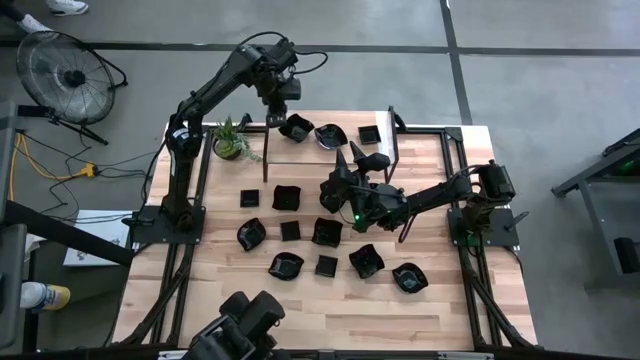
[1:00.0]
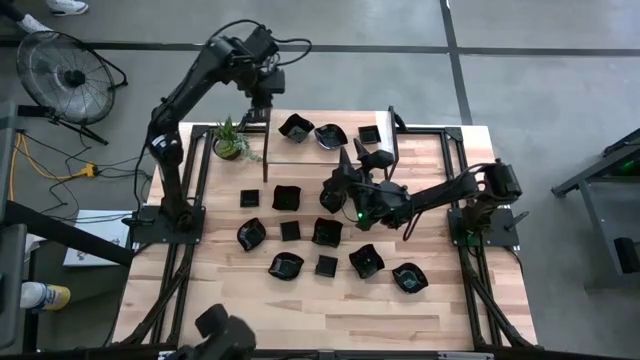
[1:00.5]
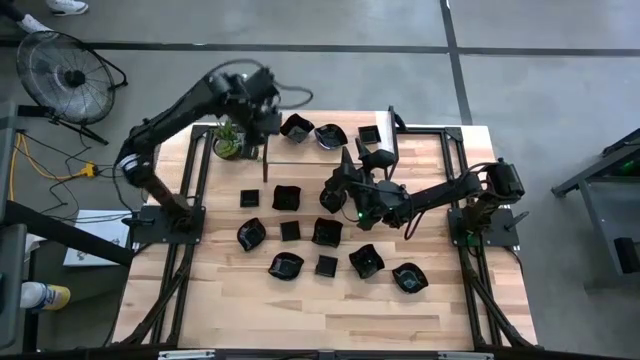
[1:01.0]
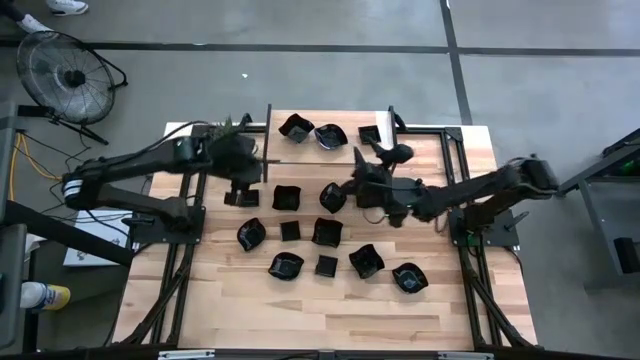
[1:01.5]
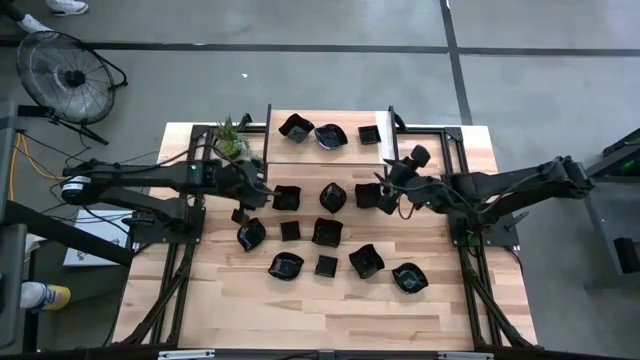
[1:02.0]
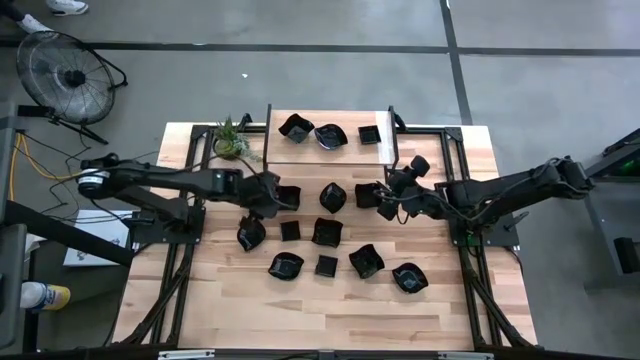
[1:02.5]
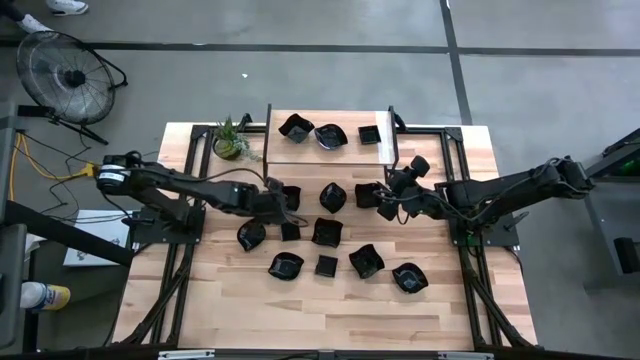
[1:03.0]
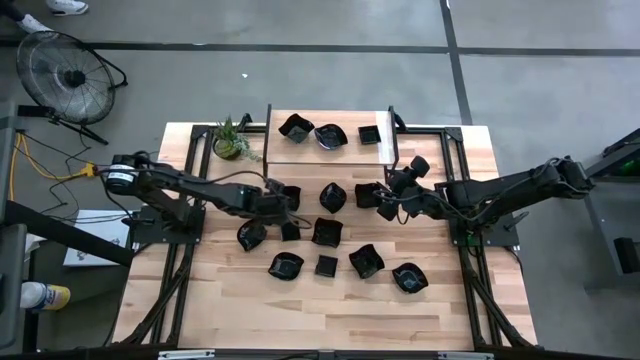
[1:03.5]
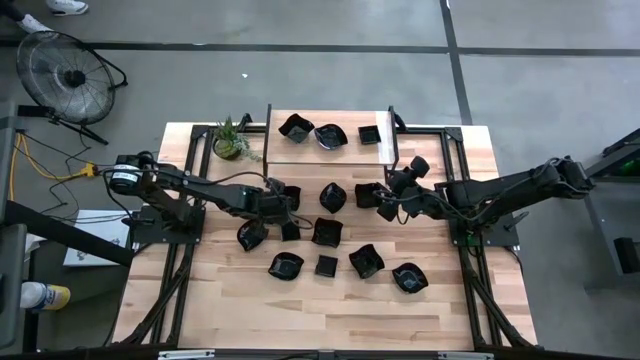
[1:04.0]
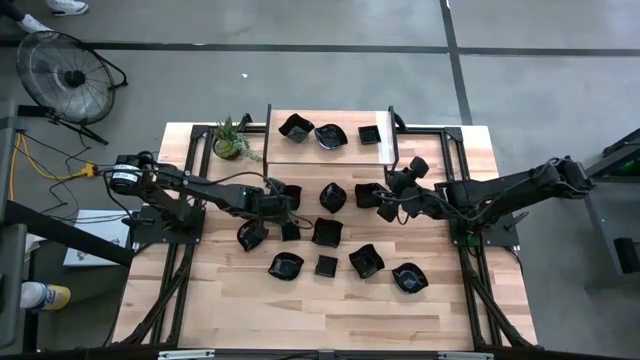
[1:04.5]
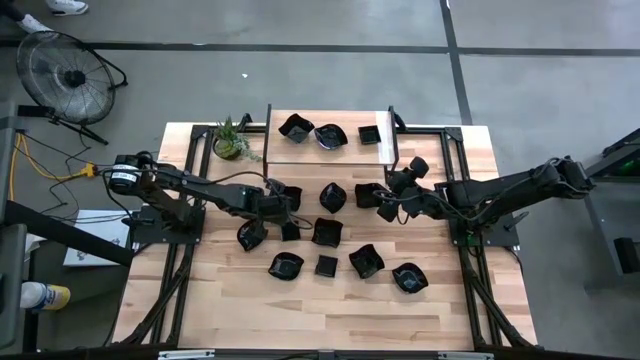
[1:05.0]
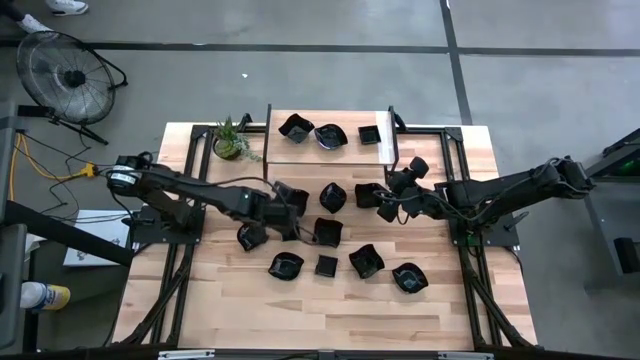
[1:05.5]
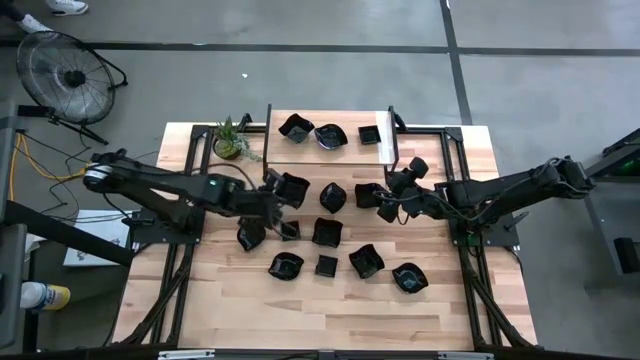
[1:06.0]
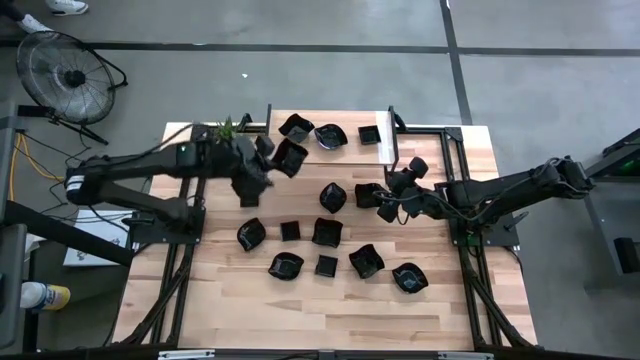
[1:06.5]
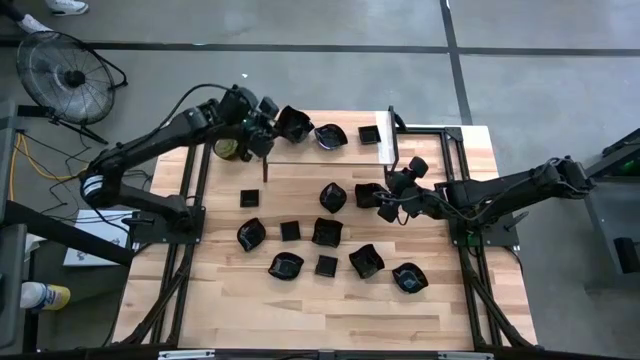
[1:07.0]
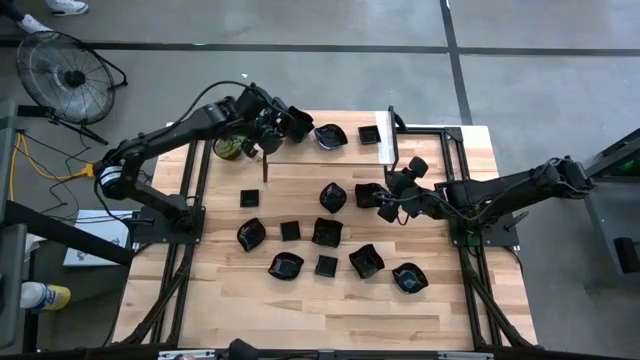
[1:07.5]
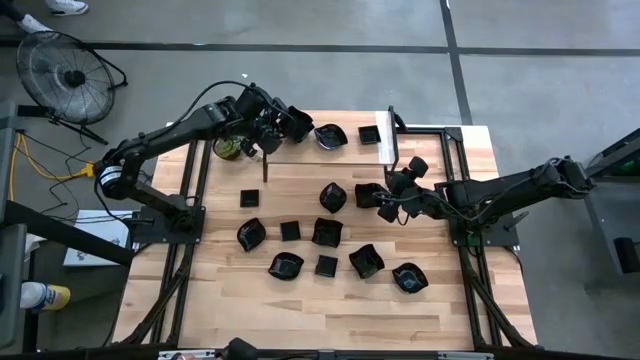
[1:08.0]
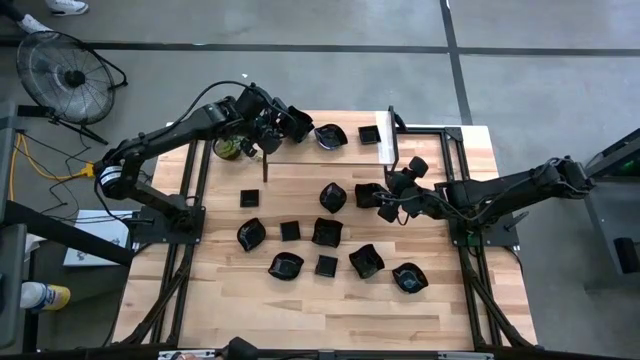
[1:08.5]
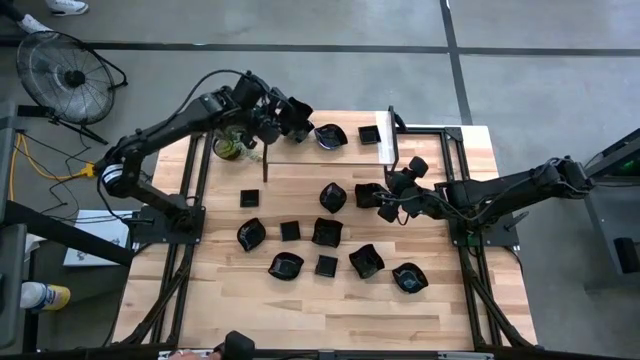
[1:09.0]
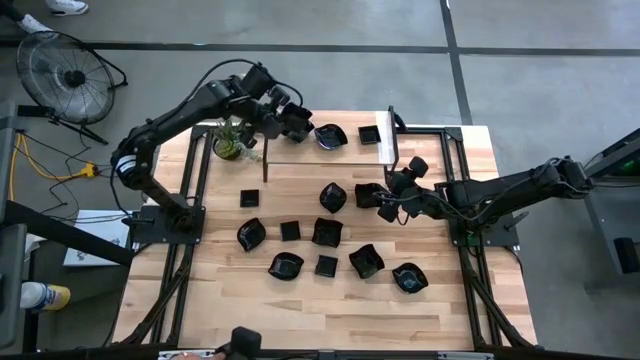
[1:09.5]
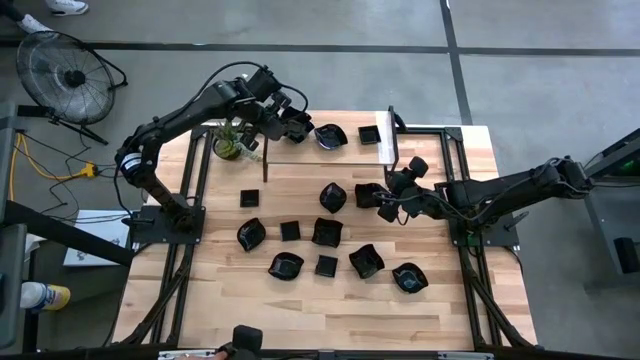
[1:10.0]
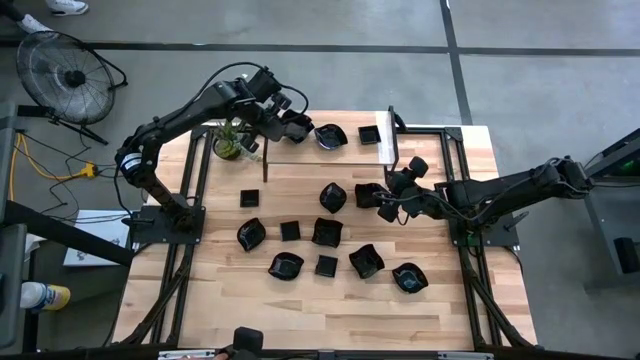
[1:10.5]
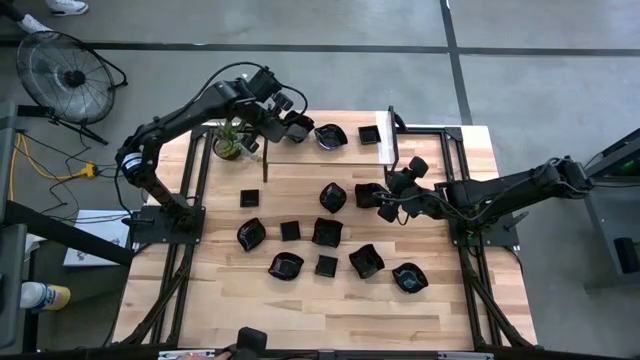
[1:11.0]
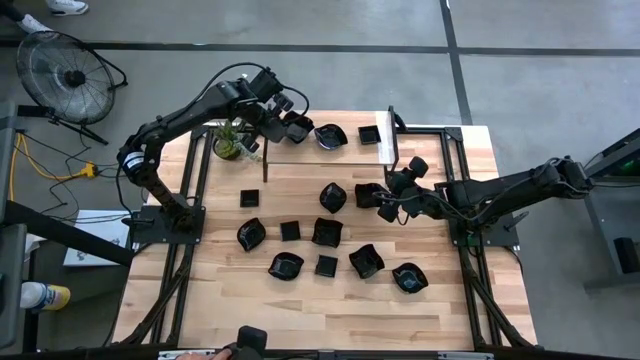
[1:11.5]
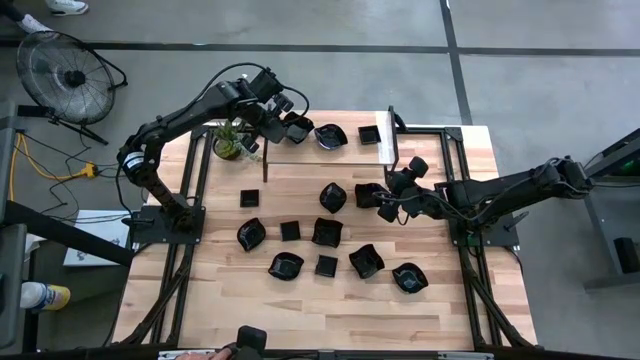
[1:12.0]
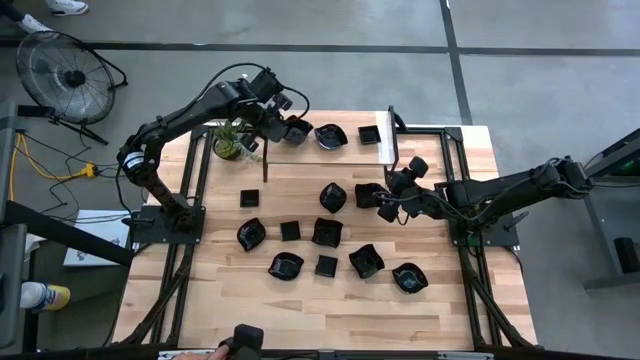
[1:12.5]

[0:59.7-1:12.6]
Task: Pick & Place Mini shaped plates
Stack the black distorted square plate on top of the black distorted square plate on the shelf

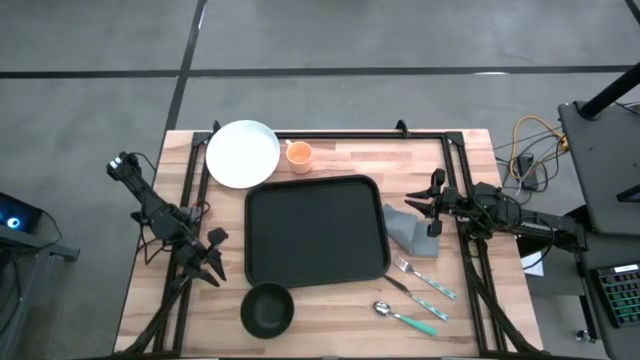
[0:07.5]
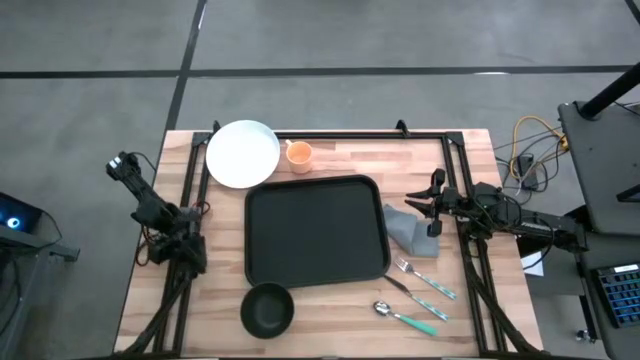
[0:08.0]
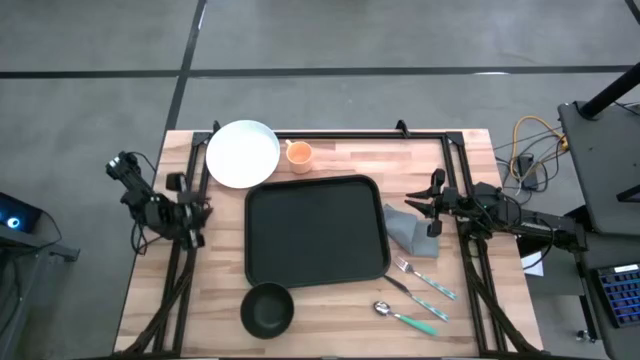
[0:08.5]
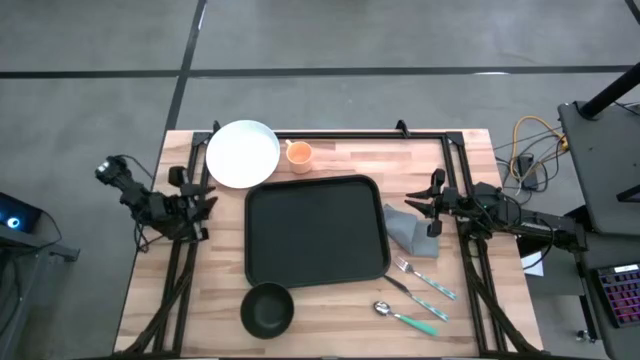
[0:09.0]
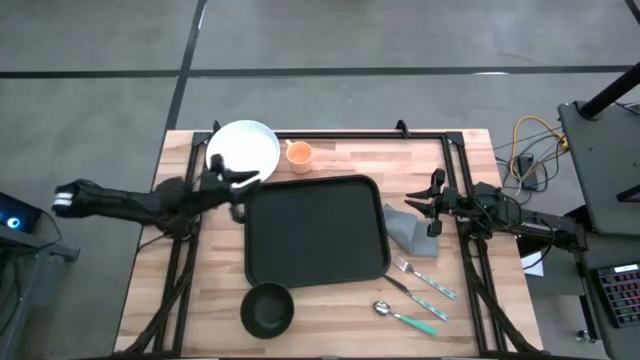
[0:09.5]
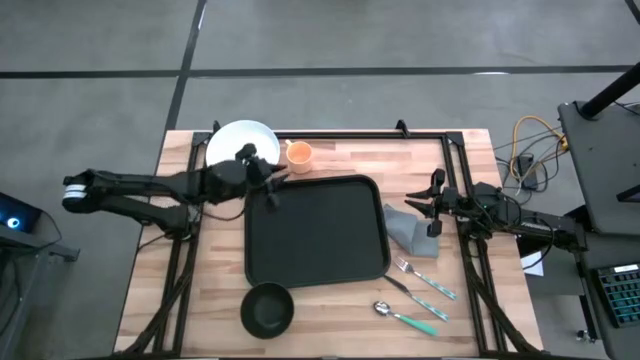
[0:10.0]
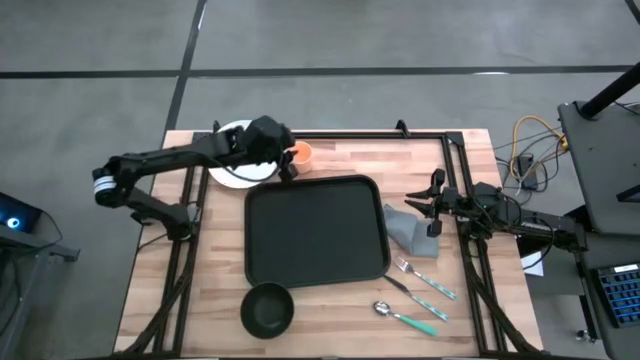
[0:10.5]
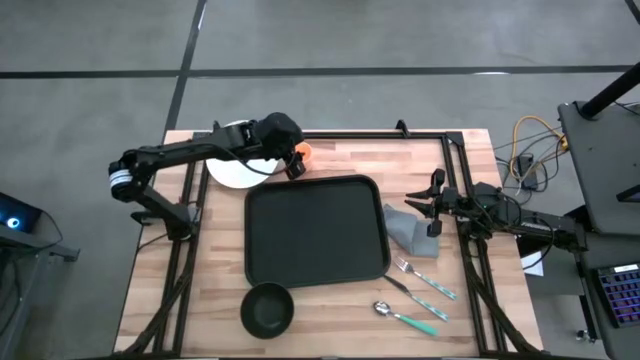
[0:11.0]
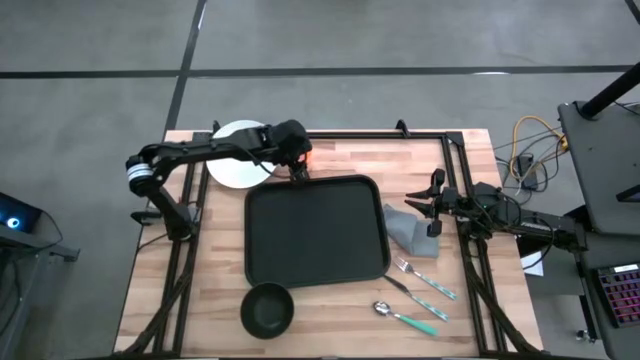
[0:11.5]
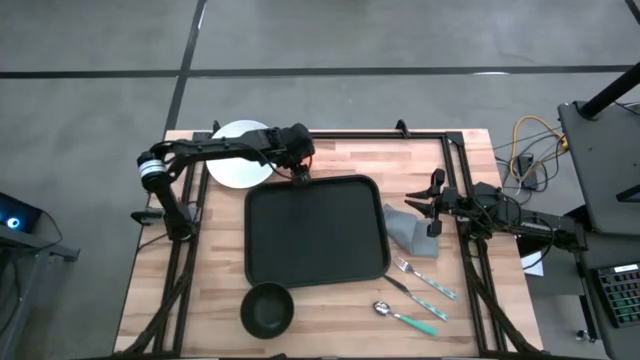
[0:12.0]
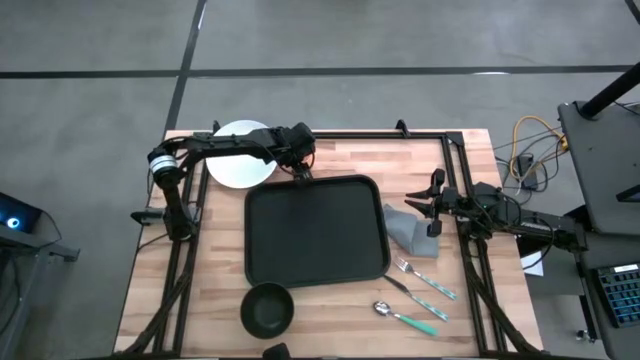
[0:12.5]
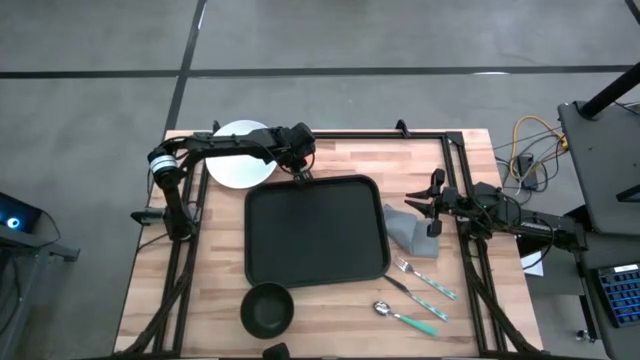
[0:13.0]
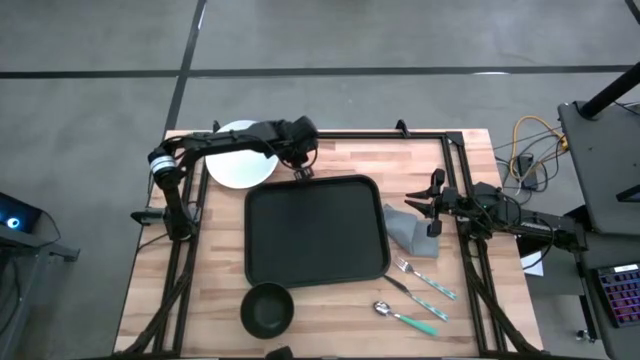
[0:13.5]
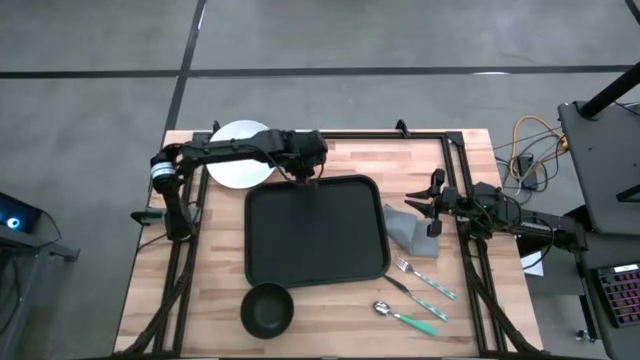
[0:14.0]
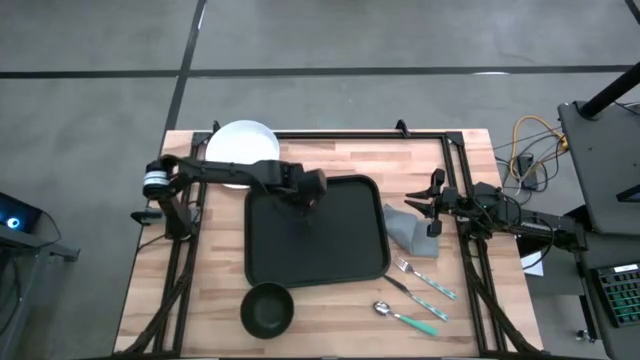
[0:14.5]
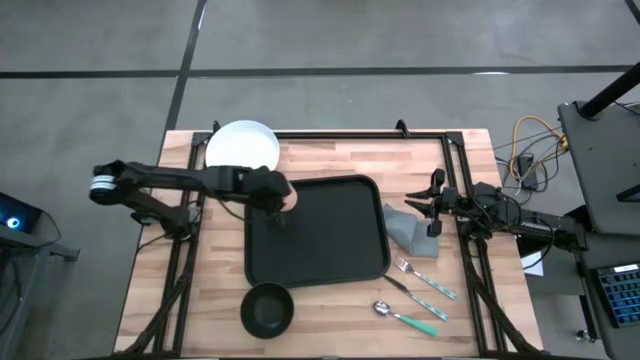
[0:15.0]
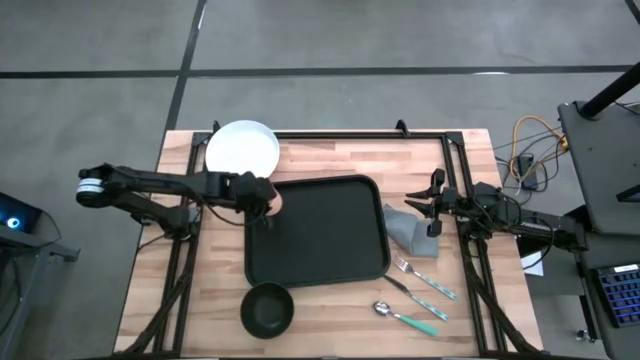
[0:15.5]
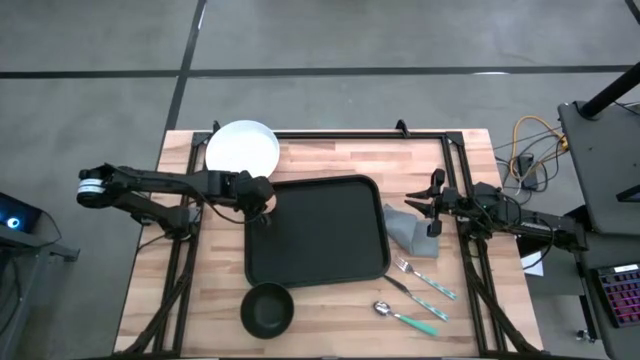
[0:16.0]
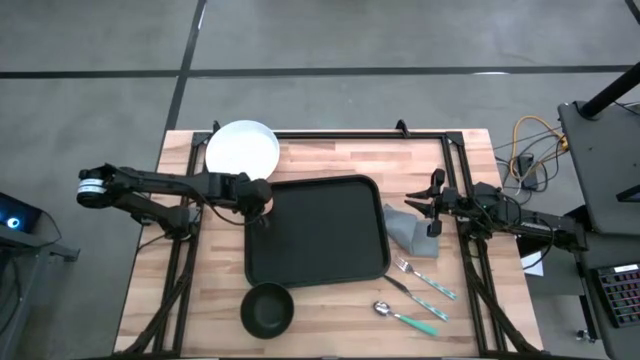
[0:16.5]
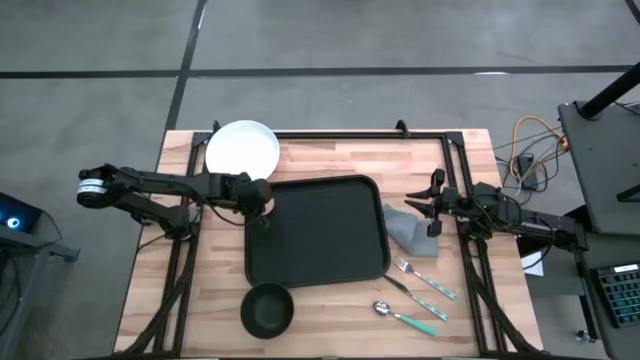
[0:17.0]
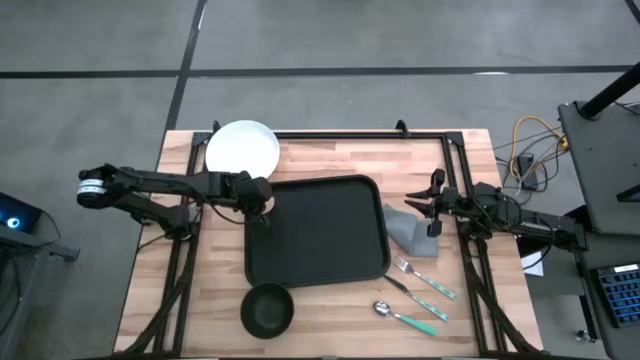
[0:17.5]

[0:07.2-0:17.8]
Task: Set up tray
Put the orange mug on the top of the black serving tray
